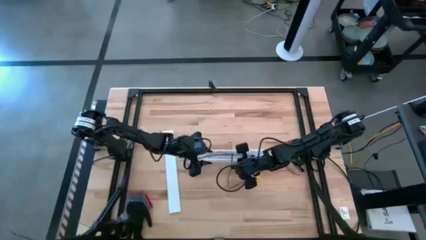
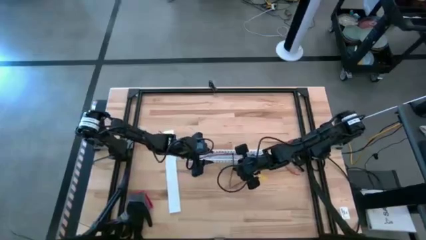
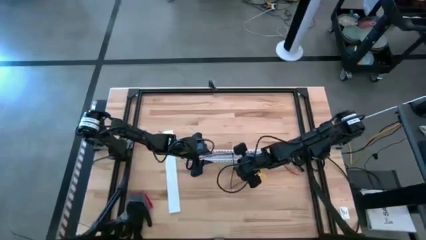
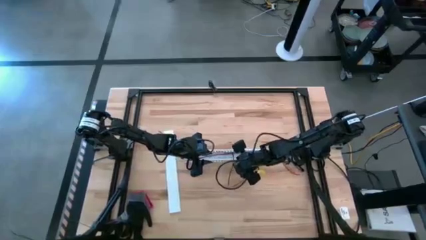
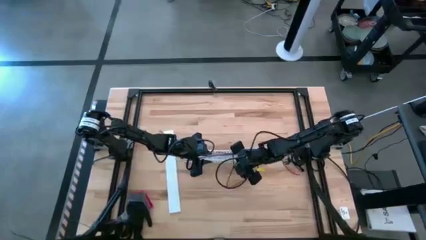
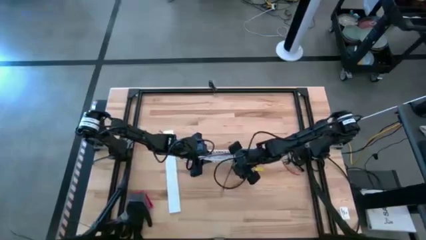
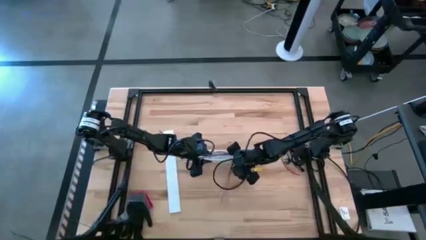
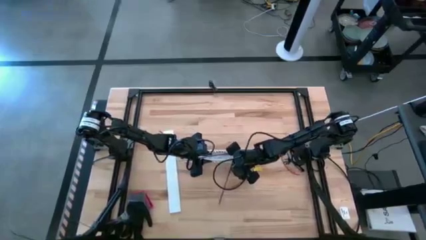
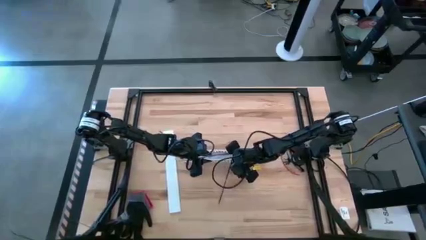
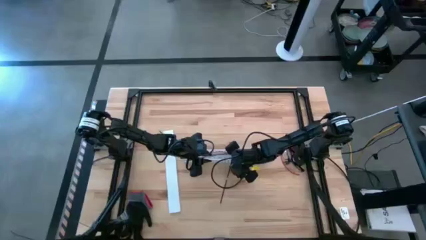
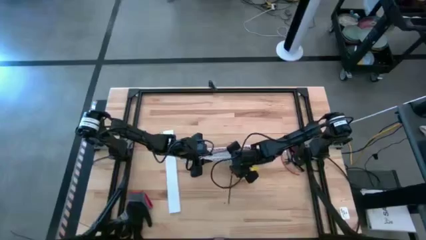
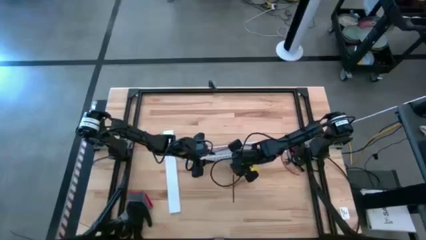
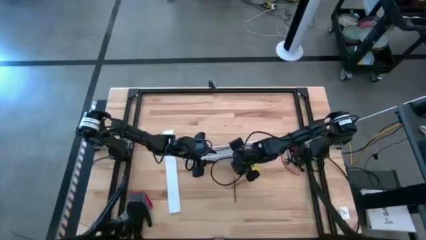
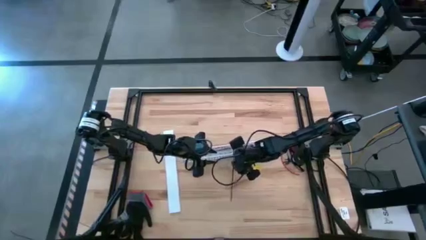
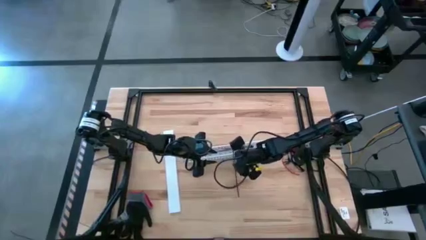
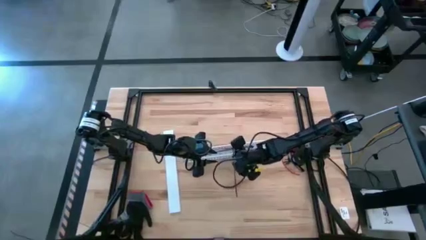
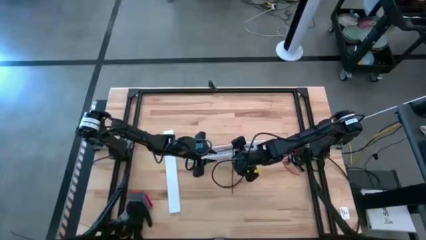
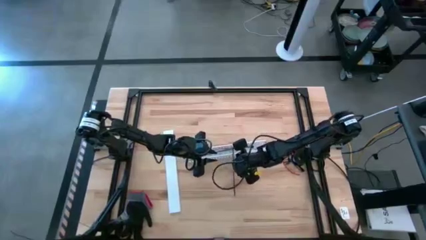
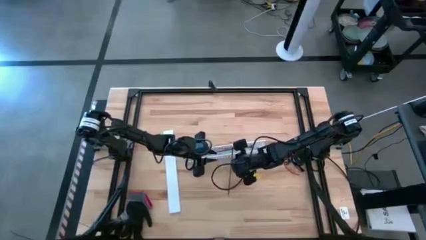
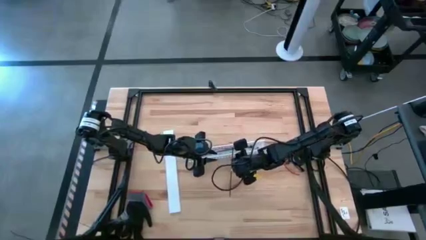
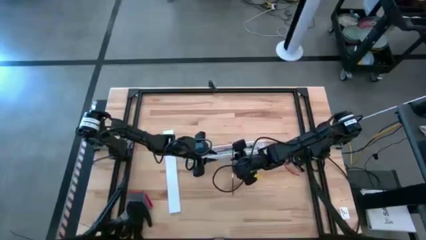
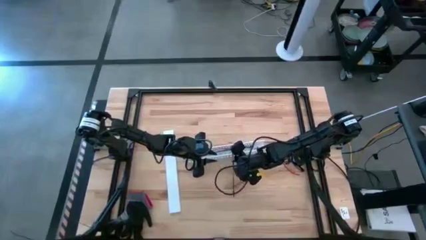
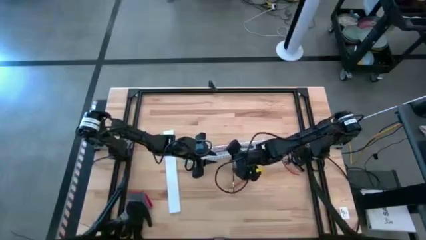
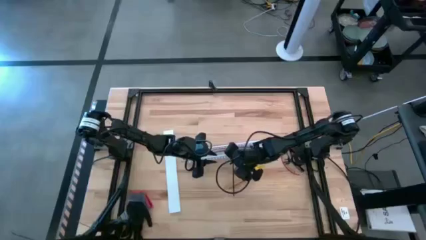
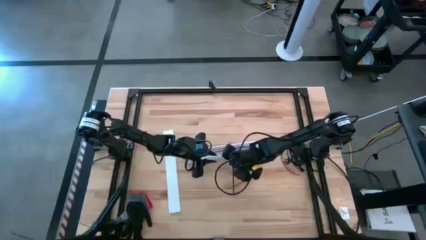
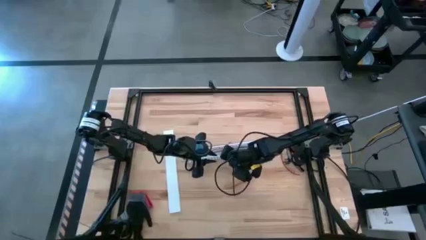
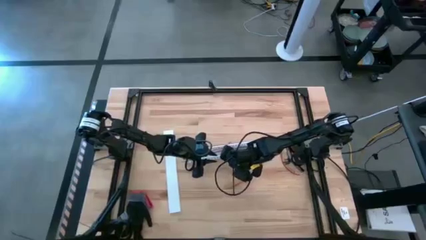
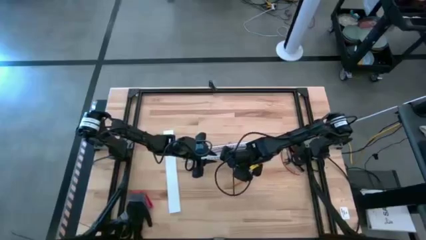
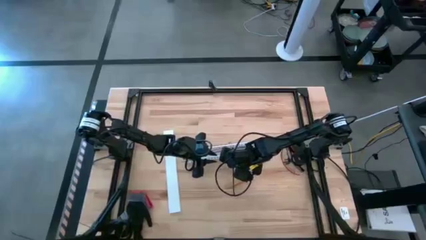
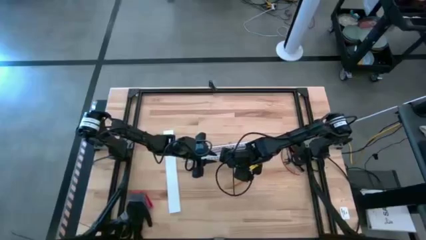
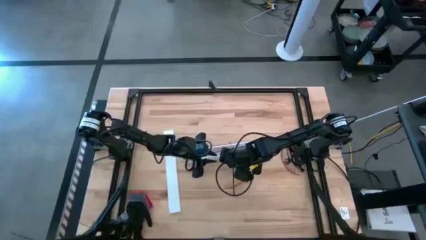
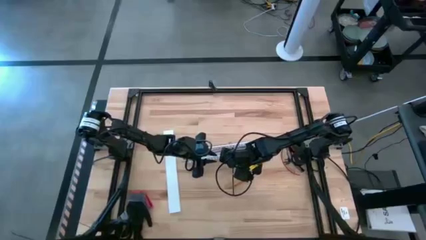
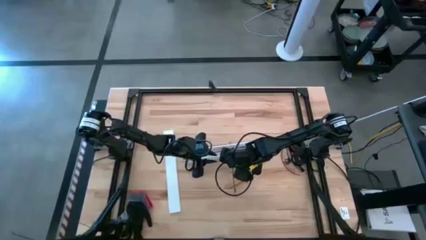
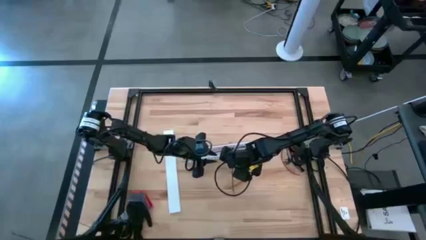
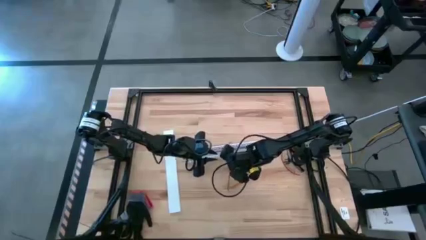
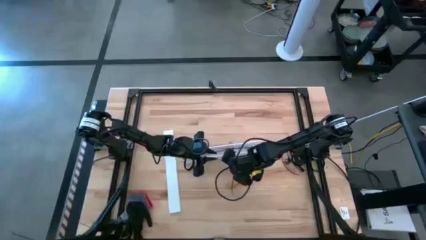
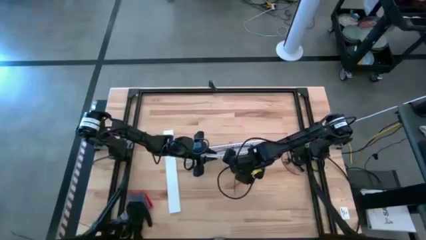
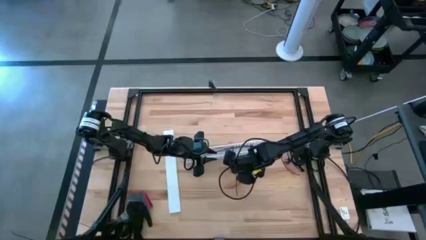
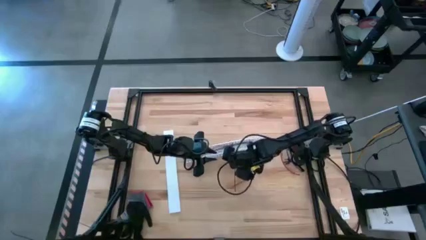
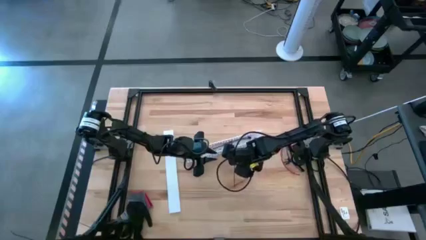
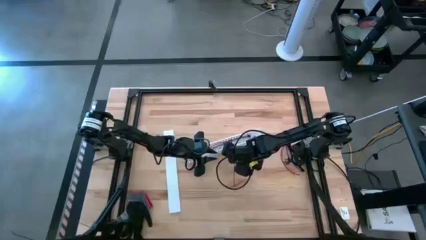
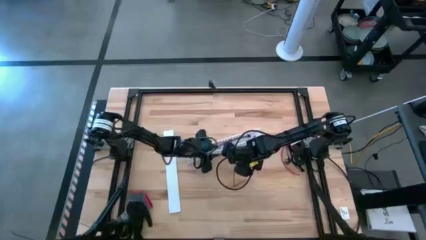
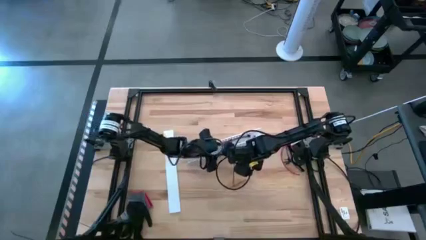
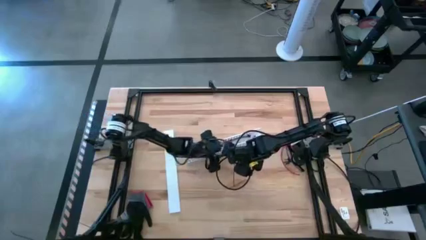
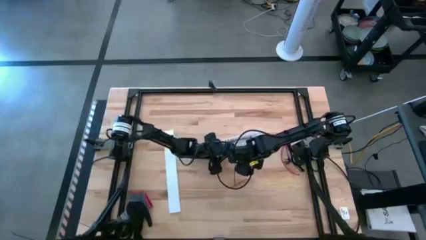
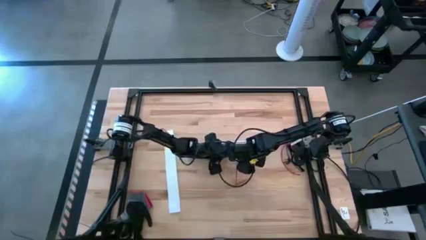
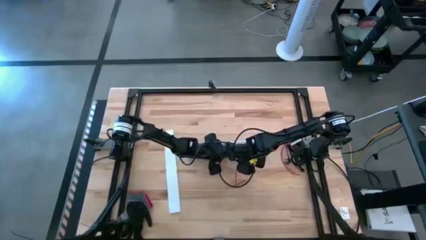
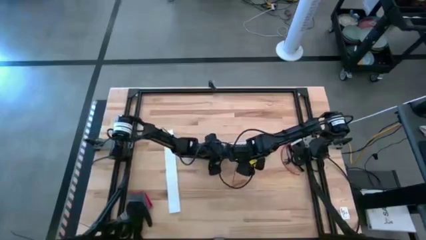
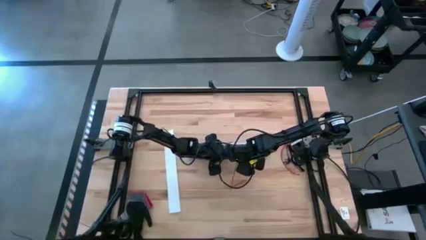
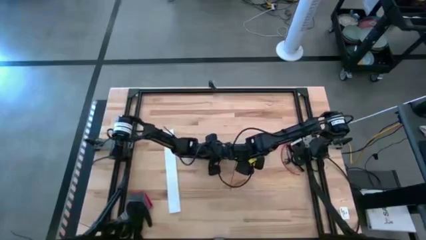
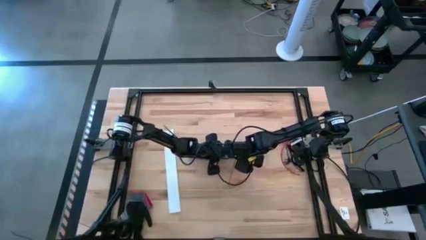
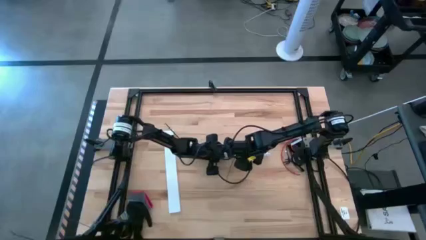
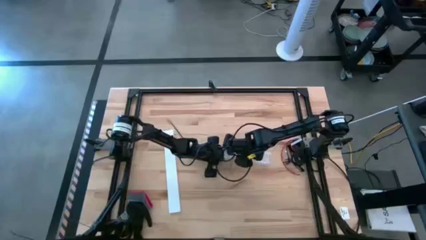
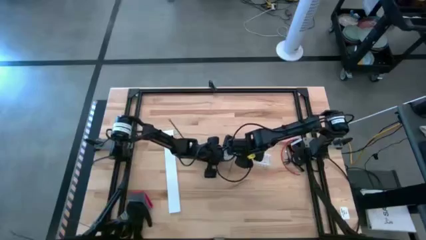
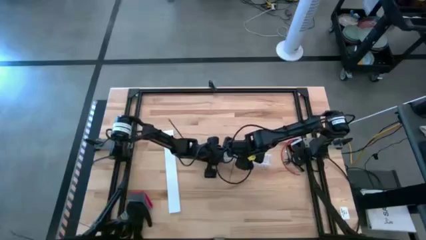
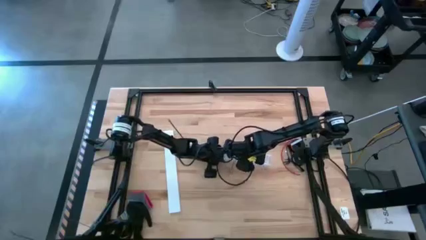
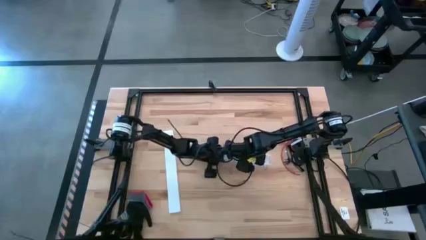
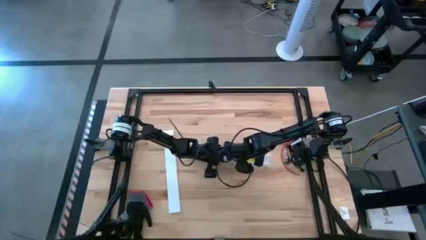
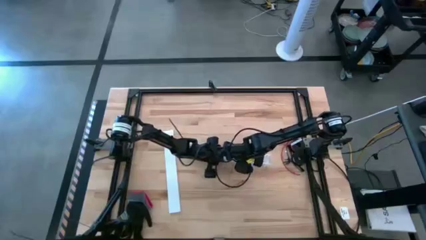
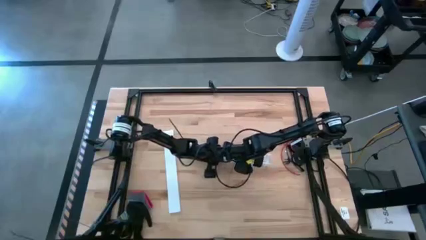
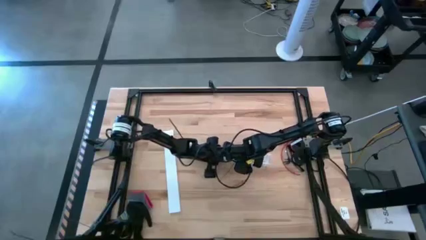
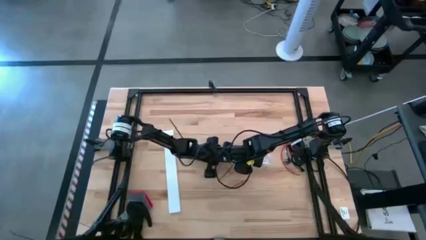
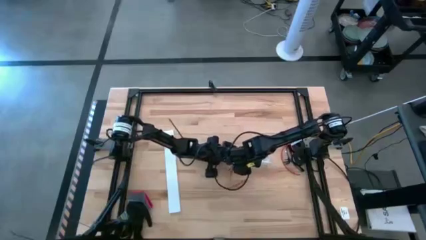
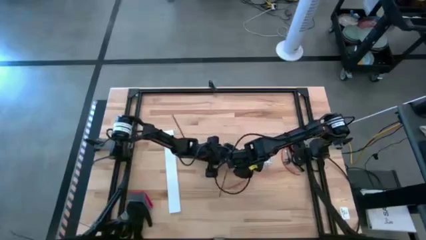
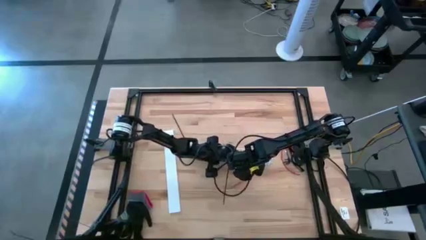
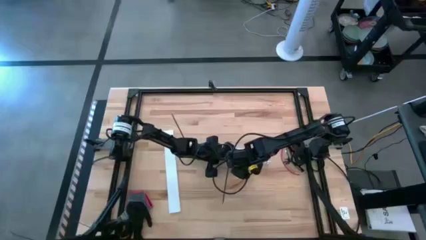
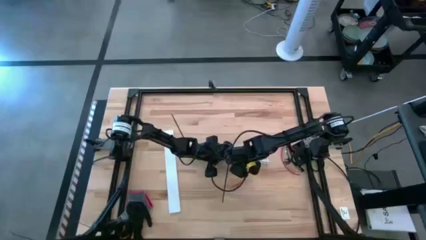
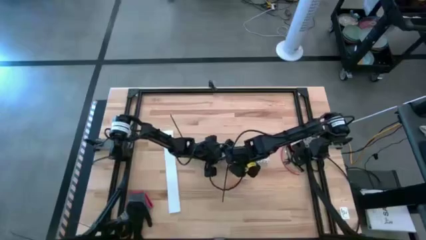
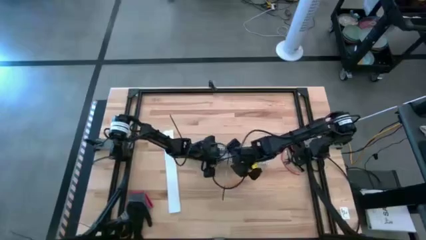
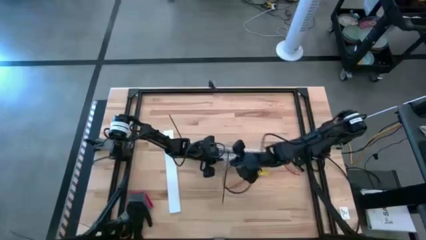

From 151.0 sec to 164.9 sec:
Task: Ziptie cables
Put the ziptied cable wires into the white cable duct

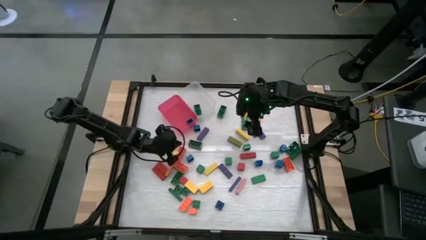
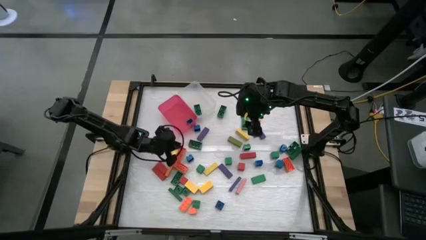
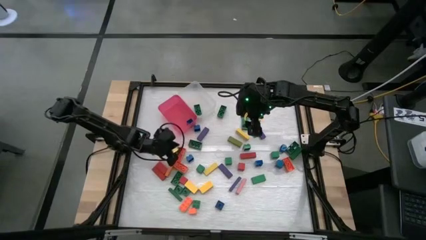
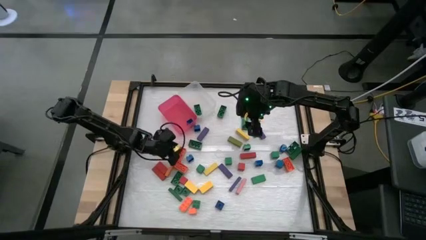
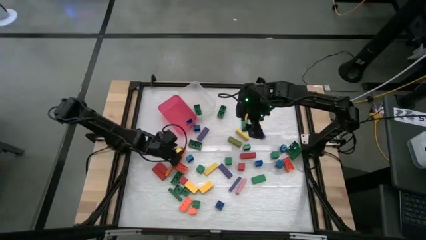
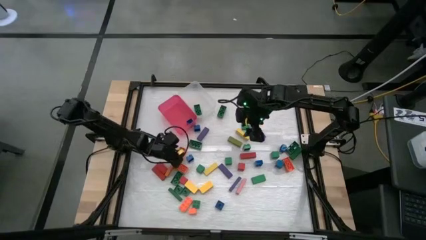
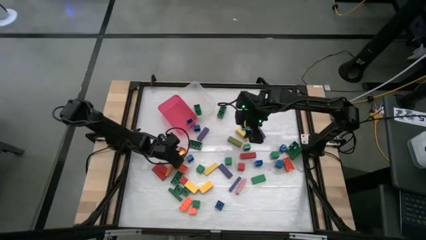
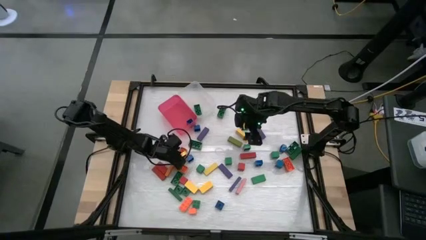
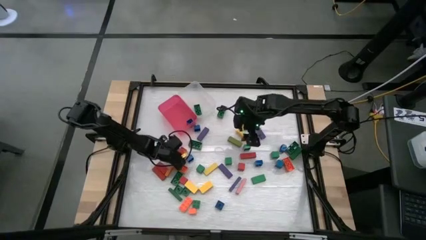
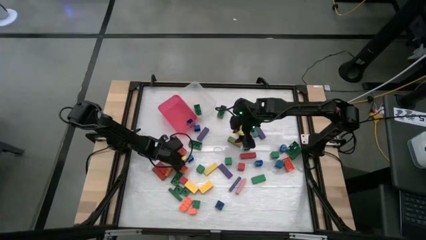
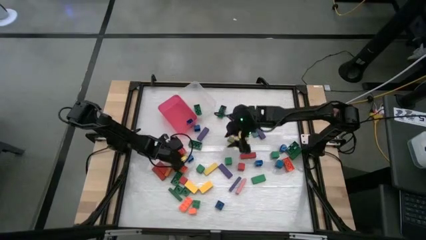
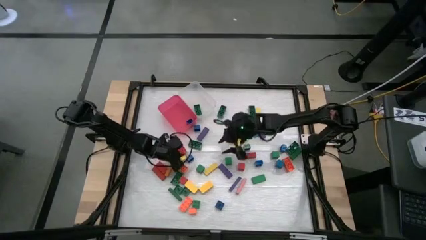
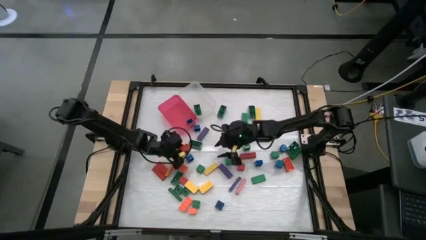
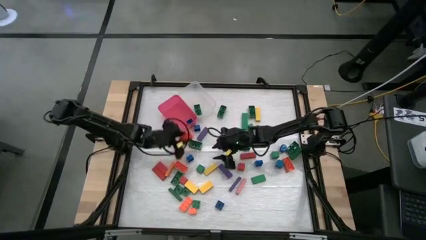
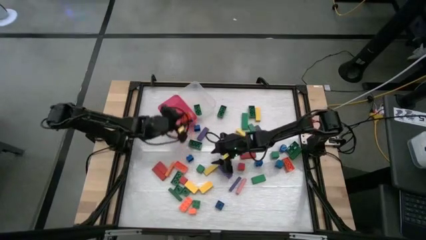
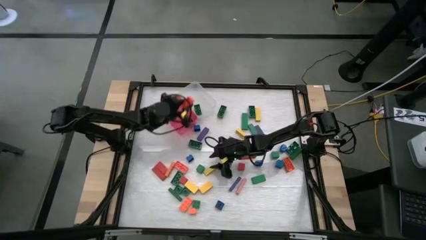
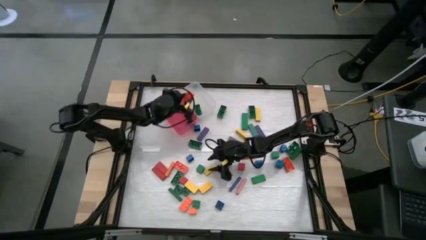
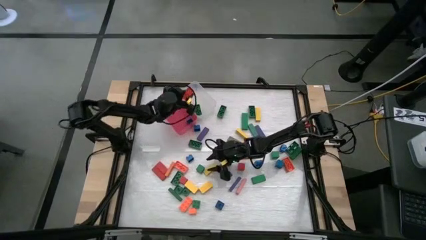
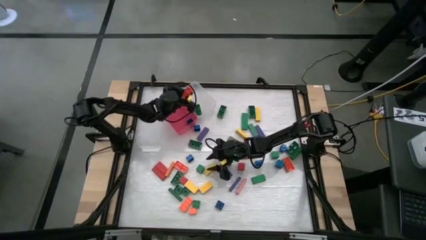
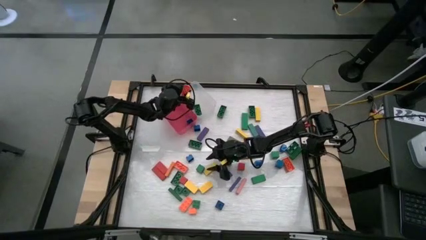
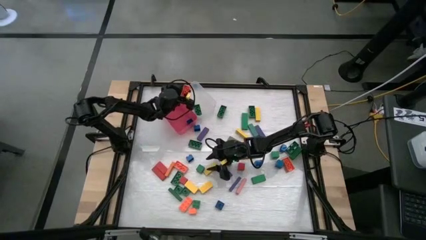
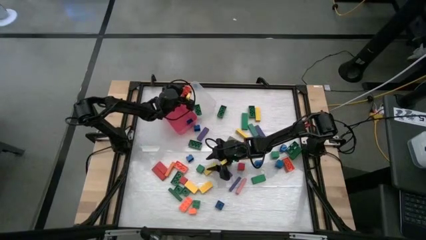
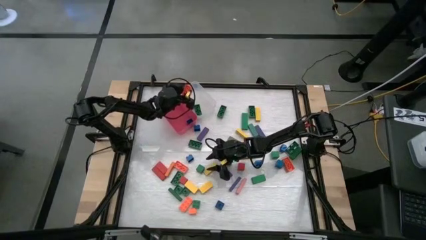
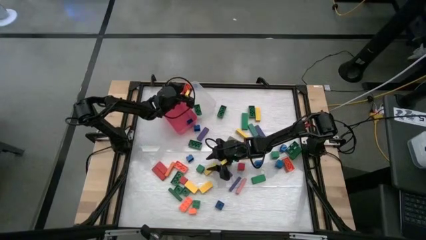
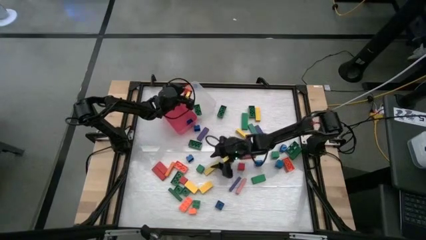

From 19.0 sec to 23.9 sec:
Task: Sort blocks by size
Put the big orange game piece into the white bin
